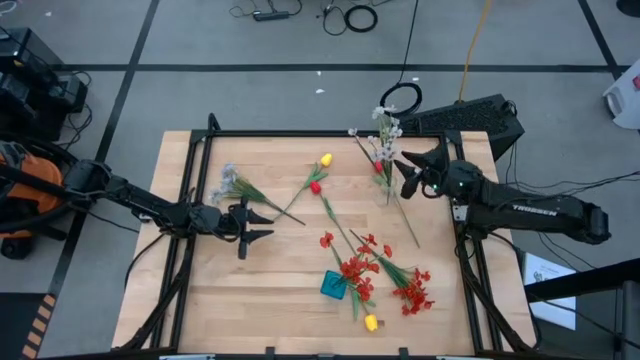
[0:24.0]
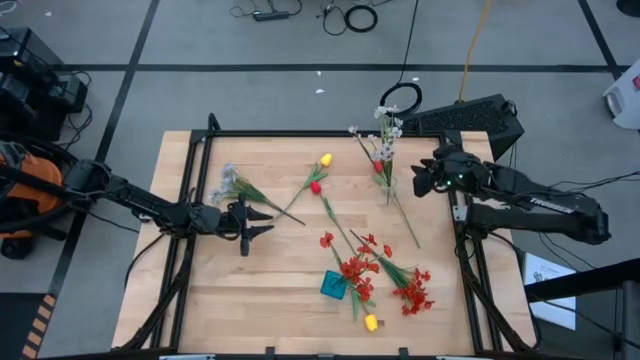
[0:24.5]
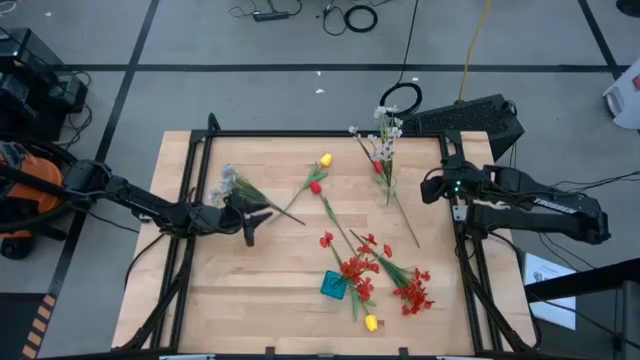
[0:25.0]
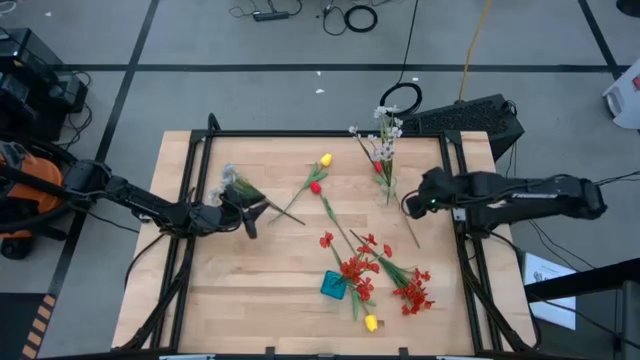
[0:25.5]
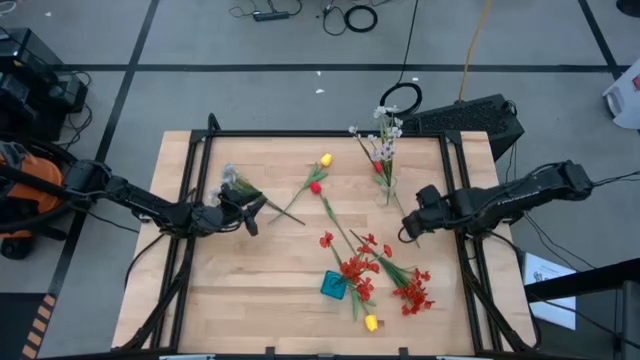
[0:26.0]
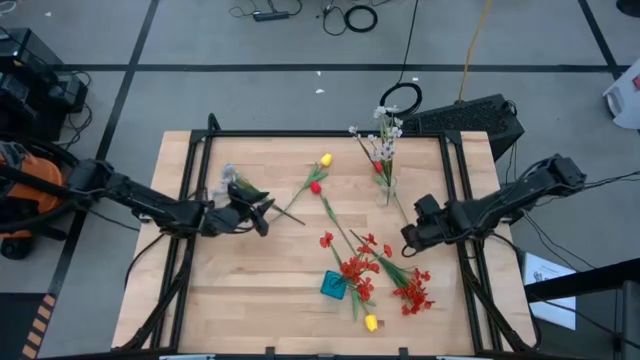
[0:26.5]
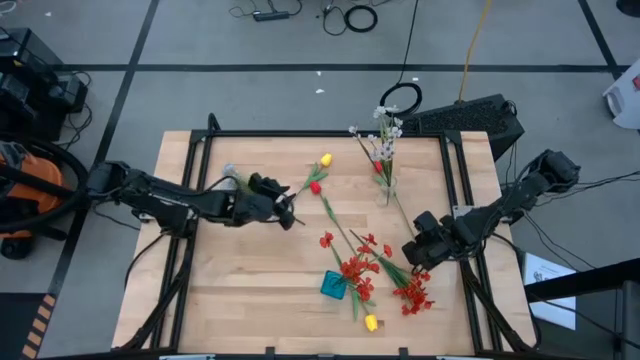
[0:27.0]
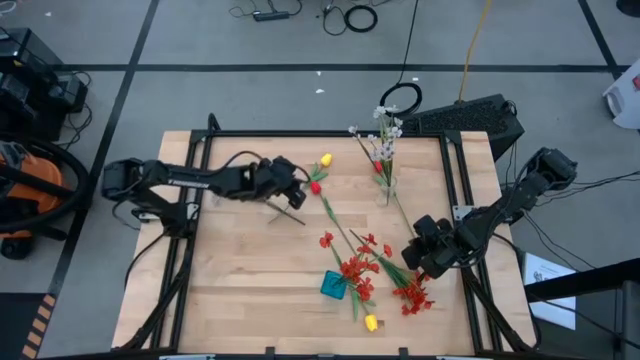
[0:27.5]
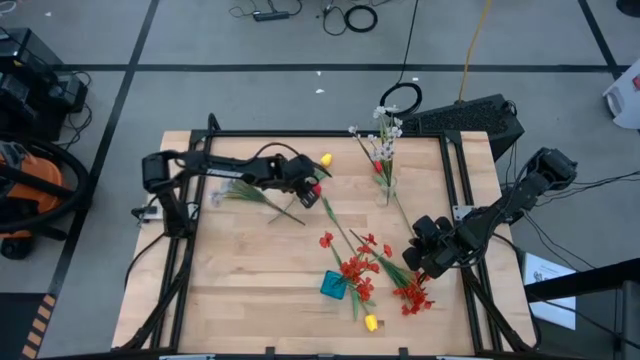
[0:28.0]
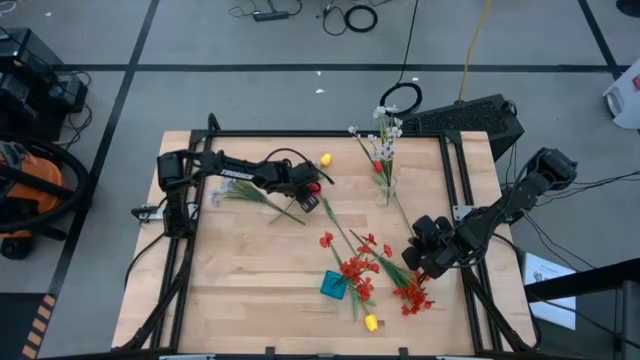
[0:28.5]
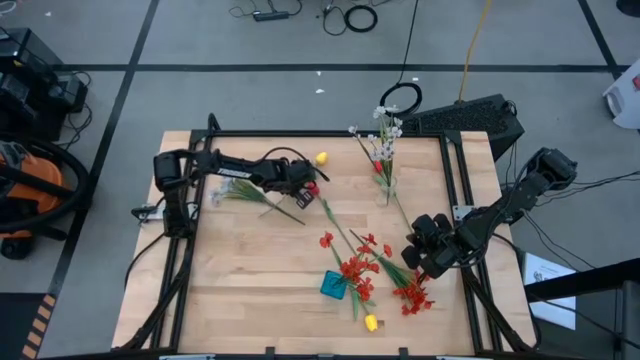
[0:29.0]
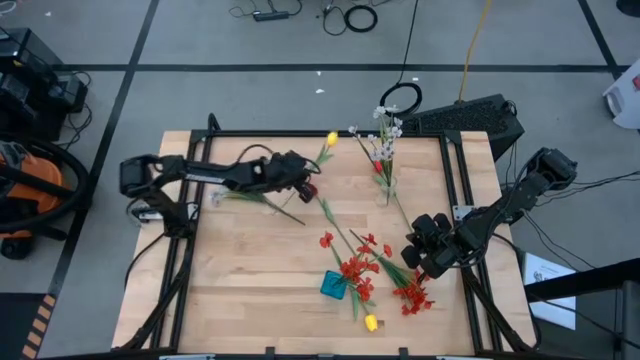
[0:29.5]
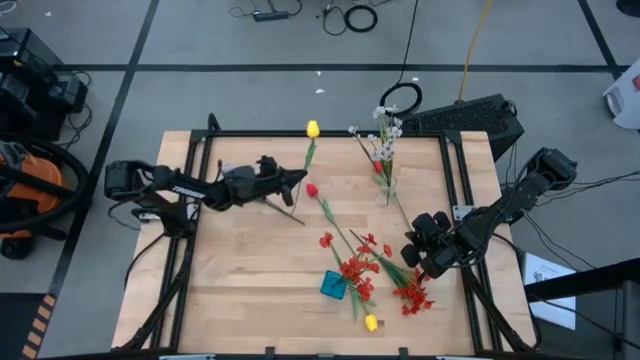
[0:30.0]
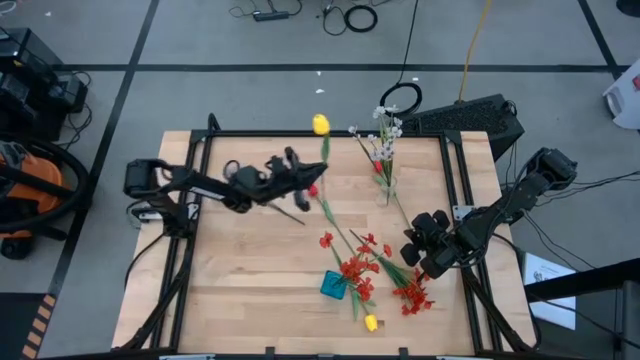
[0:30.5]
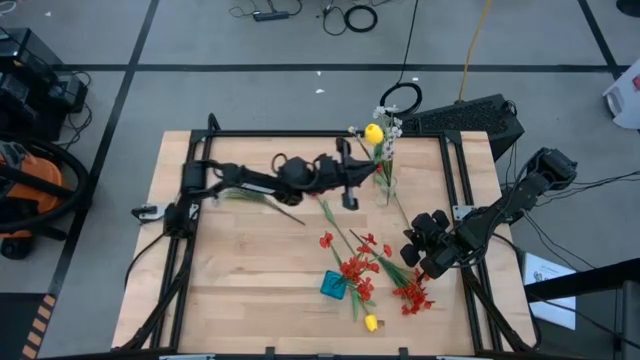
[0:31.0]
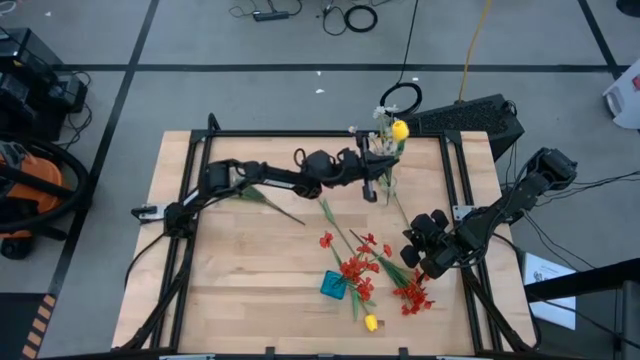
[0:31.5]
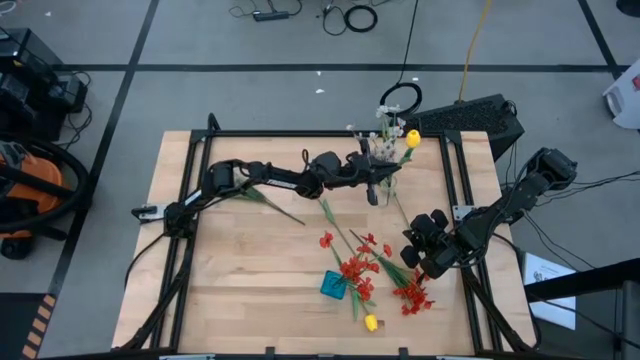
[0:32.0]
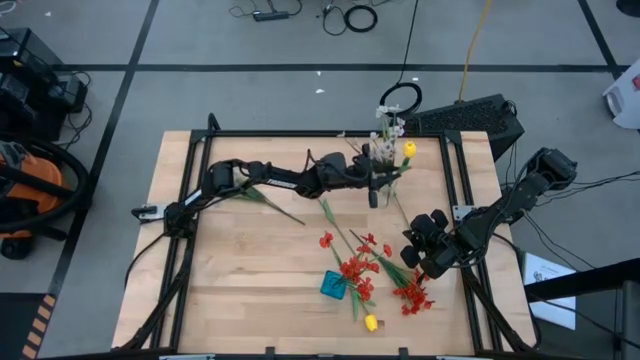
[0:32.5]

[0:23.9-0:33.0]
Task: Sort flowers into vase by color
Put the top yellow flower into the transparent vase

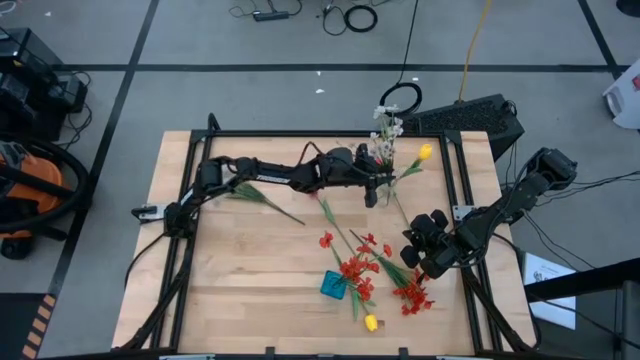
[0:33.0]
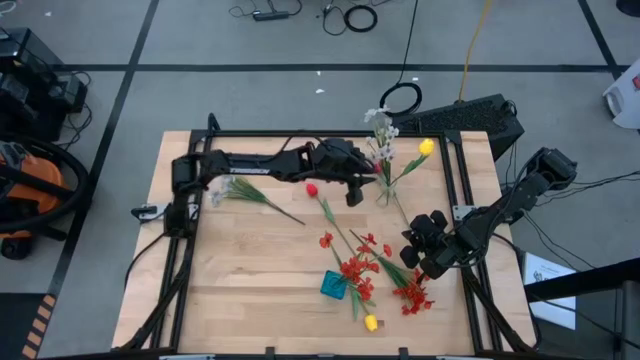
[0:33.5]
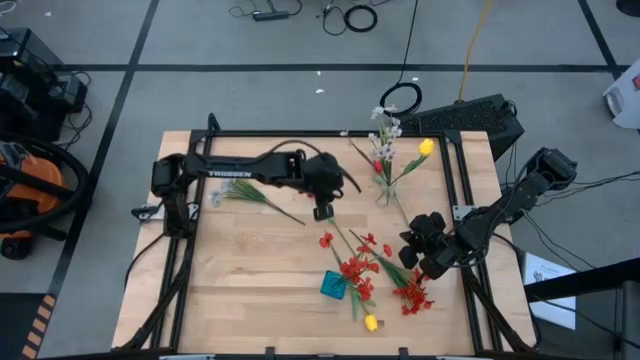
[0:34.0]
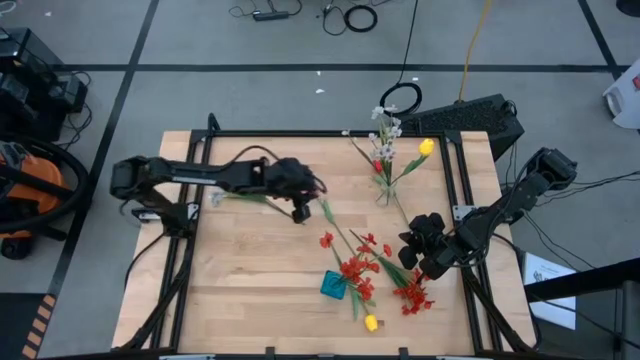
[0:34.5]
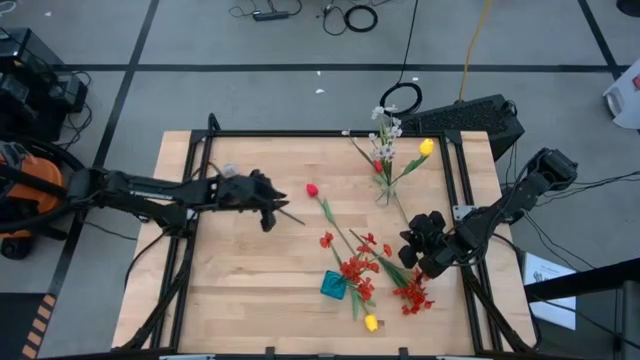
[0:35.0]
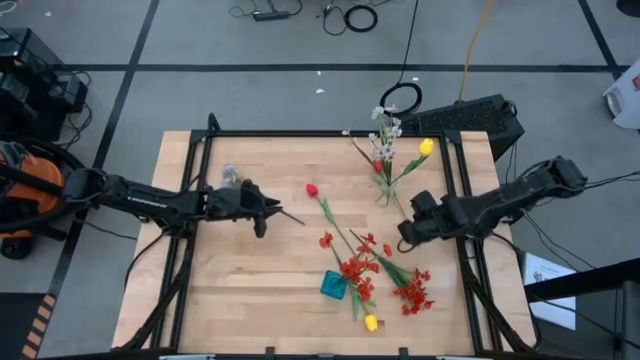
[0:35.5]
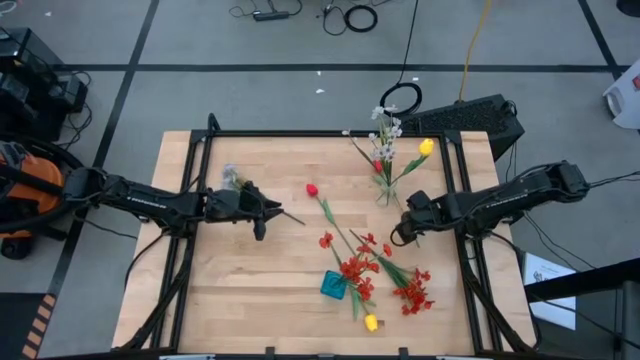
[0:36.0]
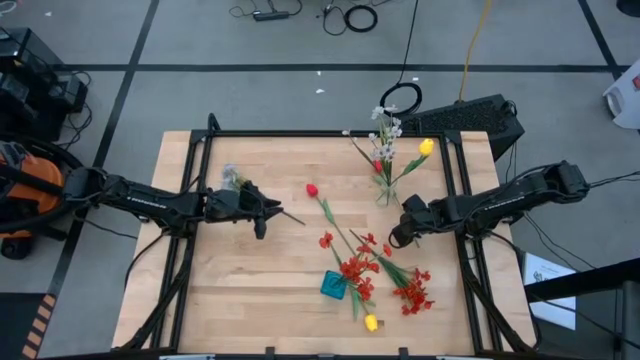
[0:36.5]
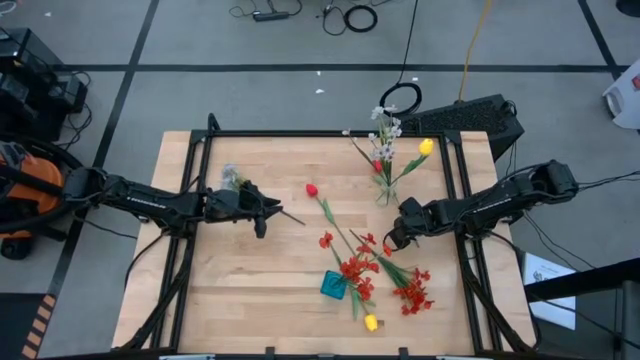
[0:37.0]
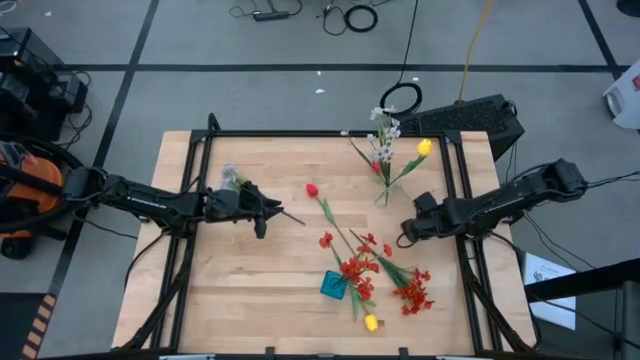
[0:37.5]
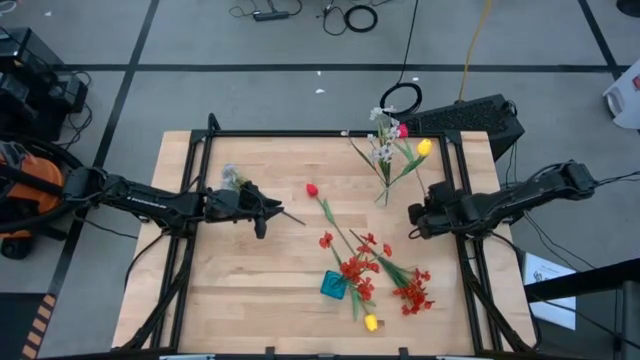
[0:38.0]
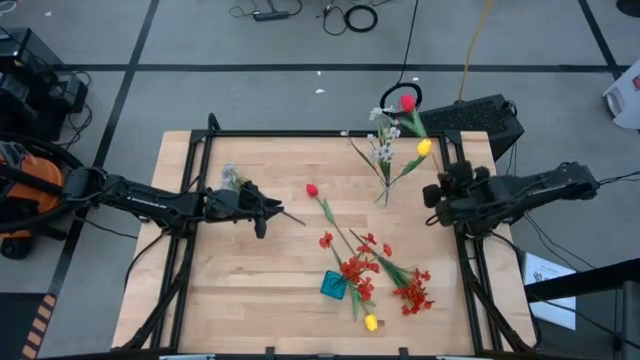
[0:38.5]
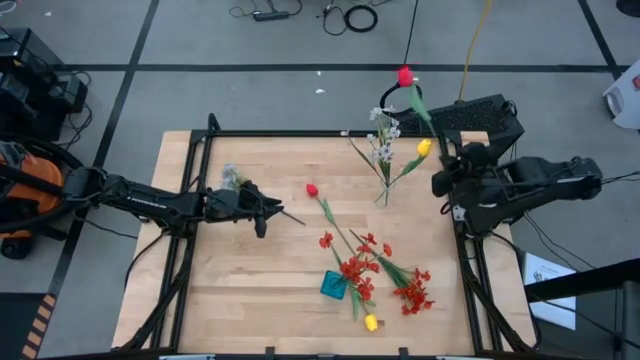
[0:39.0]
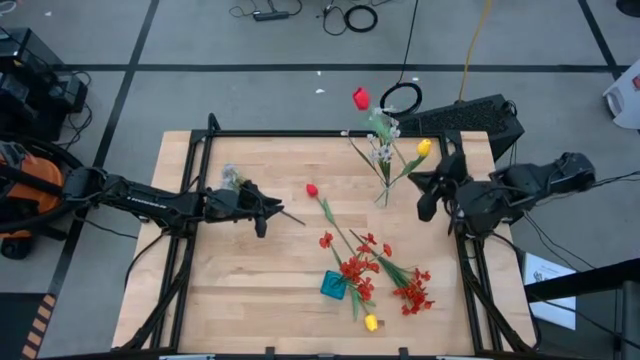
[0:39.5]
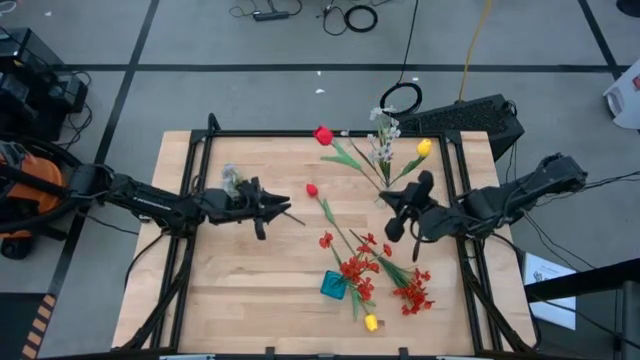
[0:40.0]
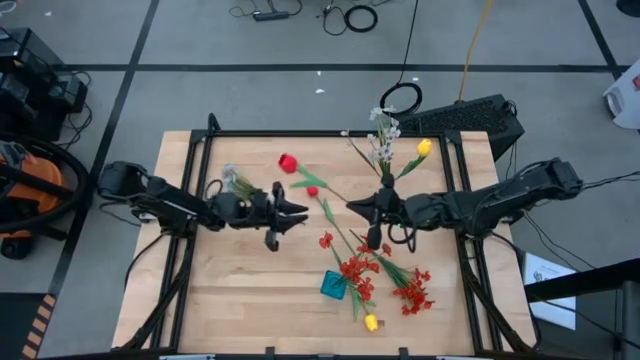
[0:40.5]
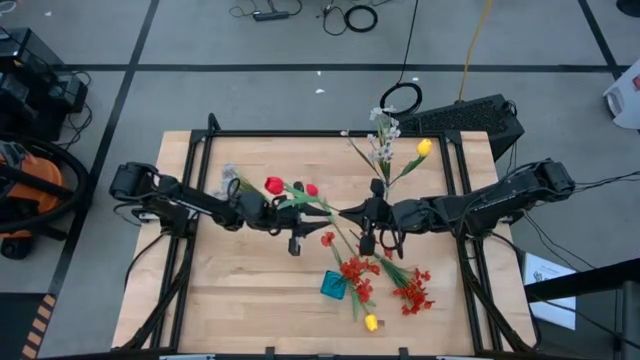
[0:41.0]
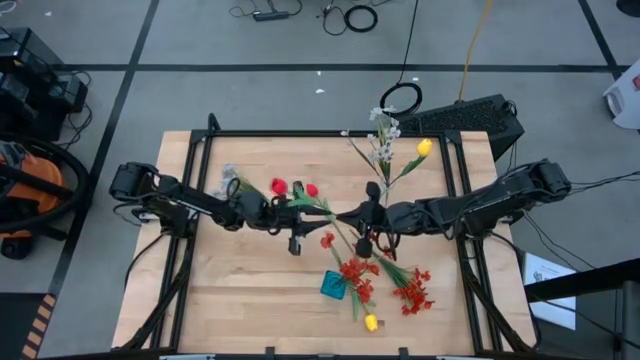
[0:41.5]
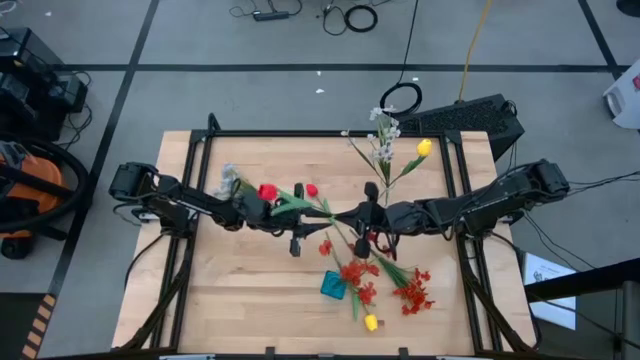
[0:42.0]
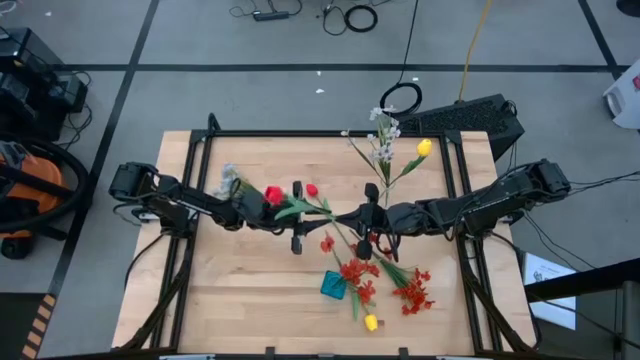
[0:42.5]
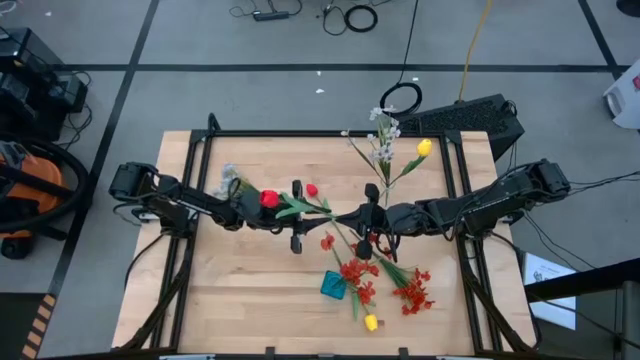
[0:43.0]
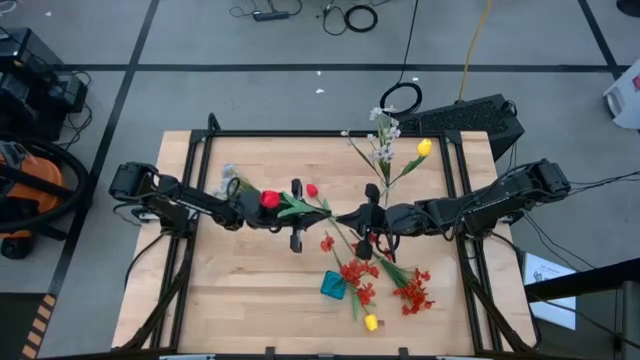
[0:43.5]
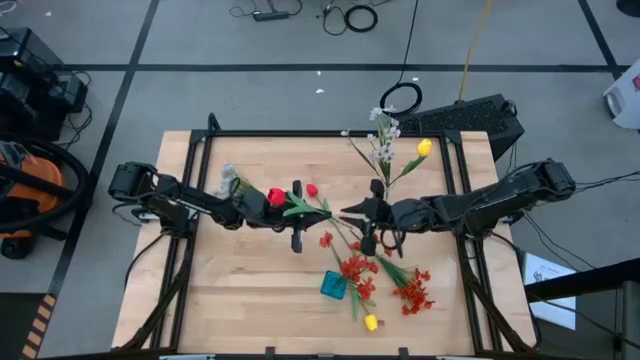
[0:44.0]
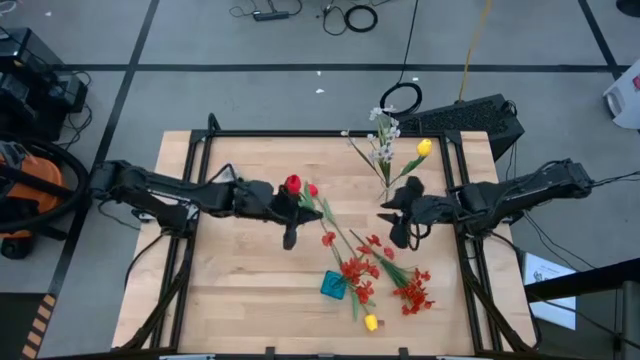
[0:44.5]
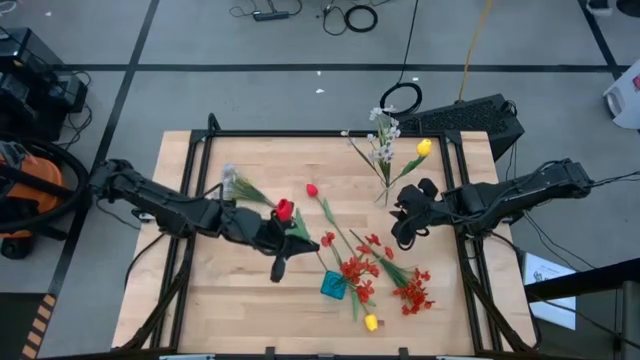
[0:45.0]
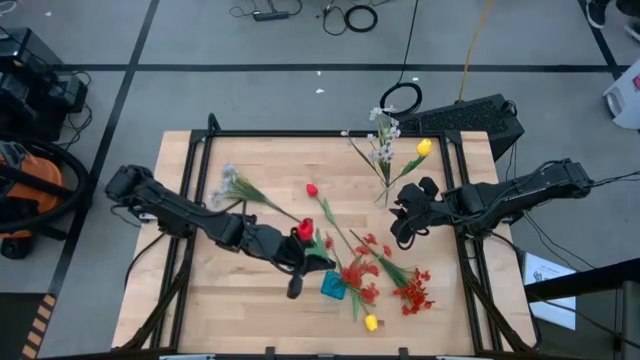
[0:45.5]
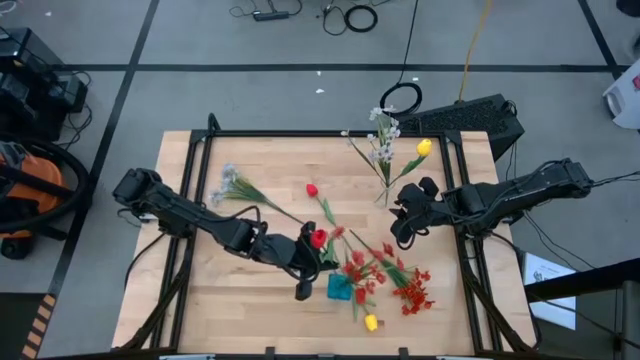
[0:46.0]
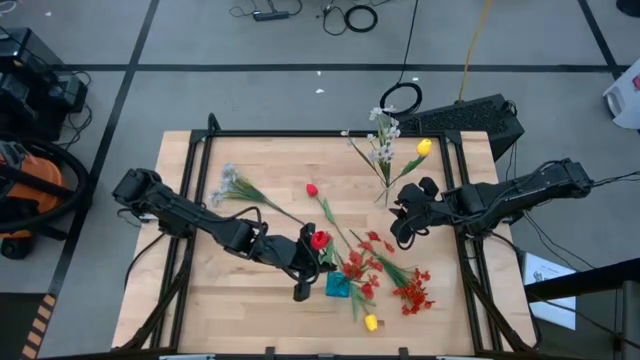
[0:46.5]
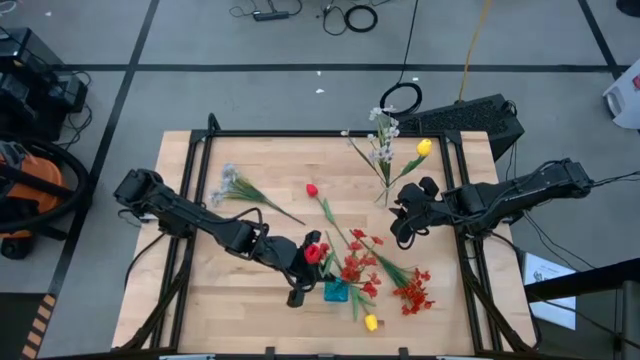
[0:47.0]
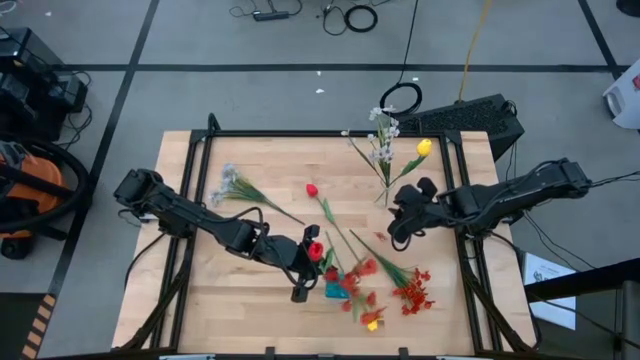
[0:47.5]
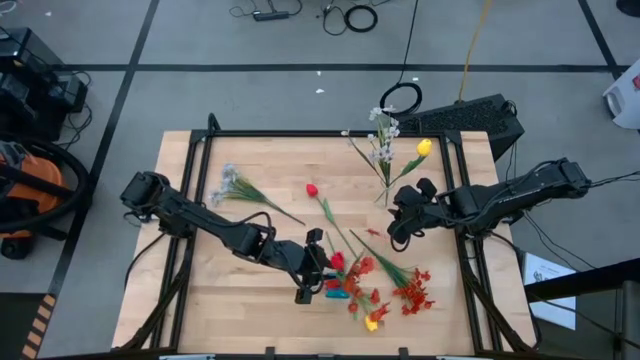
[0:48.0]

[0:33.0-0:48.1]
Put the right red flower into the blue vase
